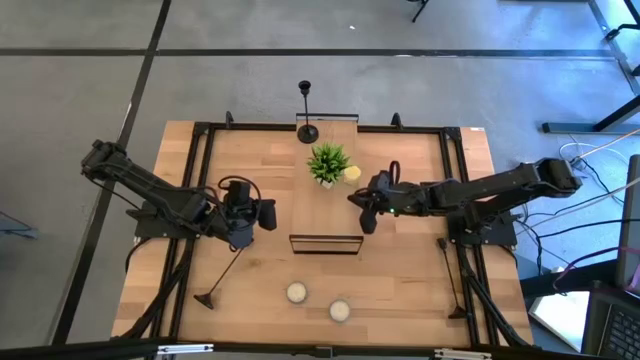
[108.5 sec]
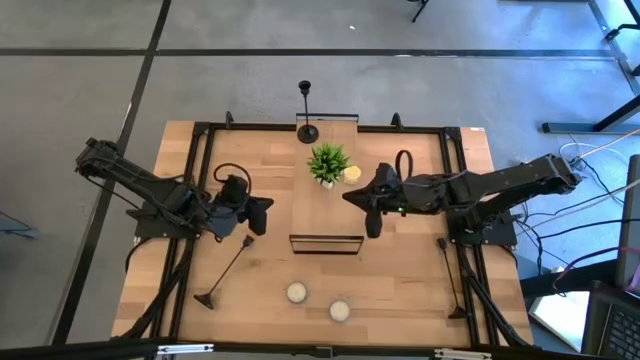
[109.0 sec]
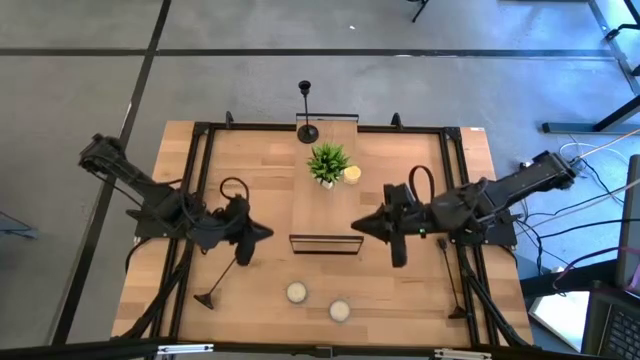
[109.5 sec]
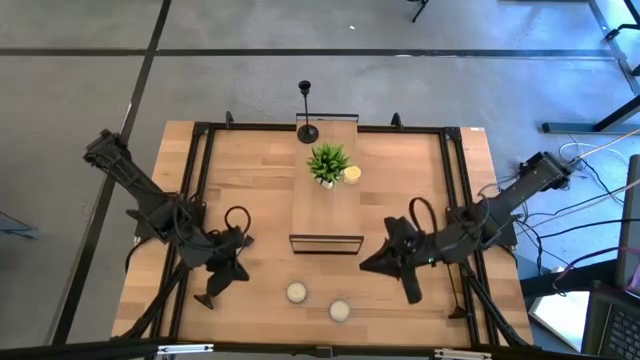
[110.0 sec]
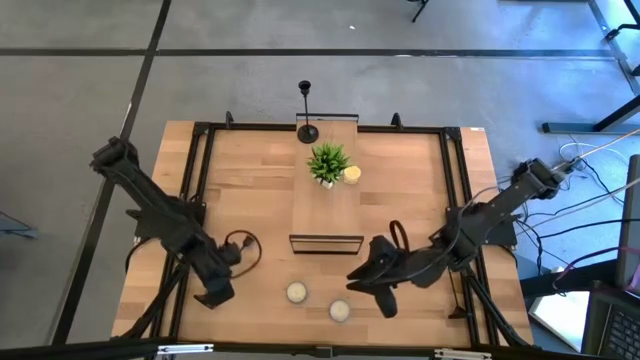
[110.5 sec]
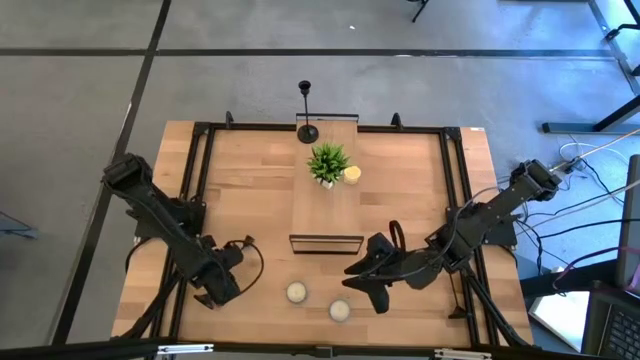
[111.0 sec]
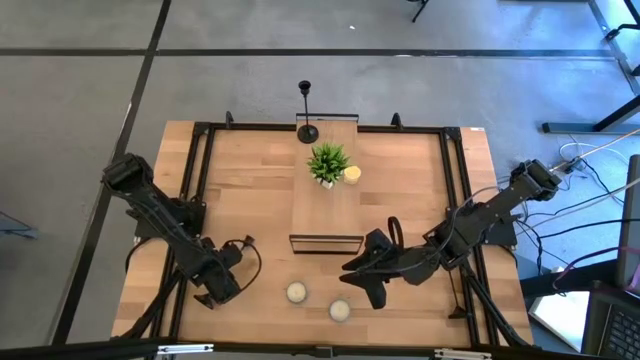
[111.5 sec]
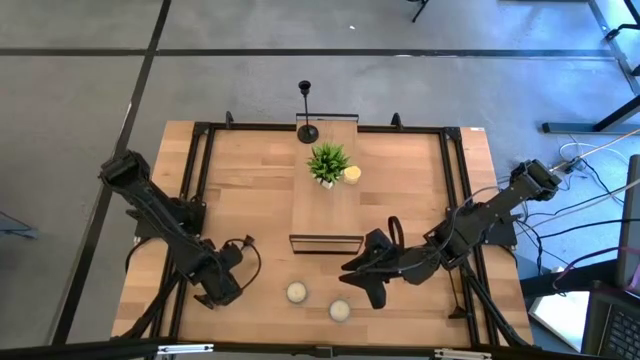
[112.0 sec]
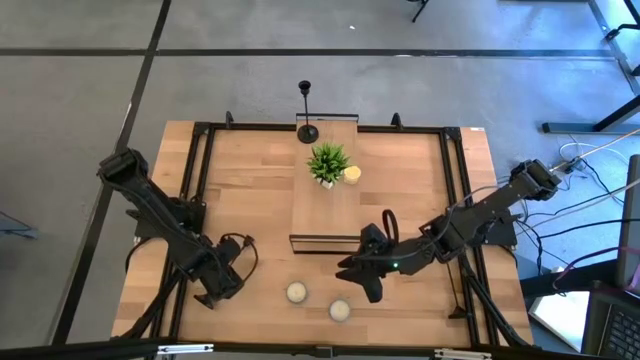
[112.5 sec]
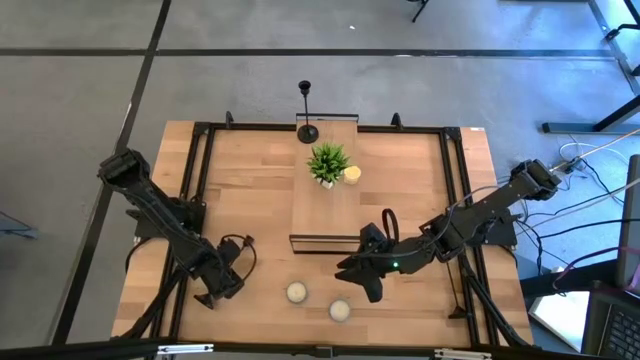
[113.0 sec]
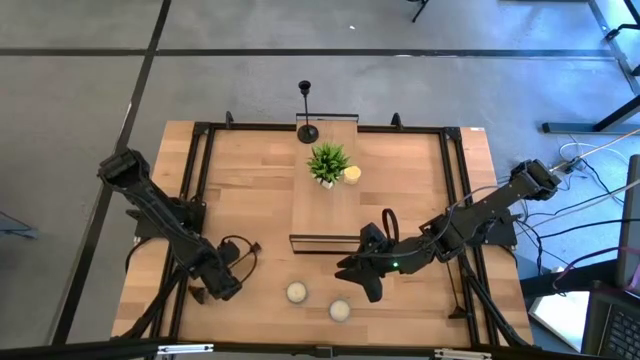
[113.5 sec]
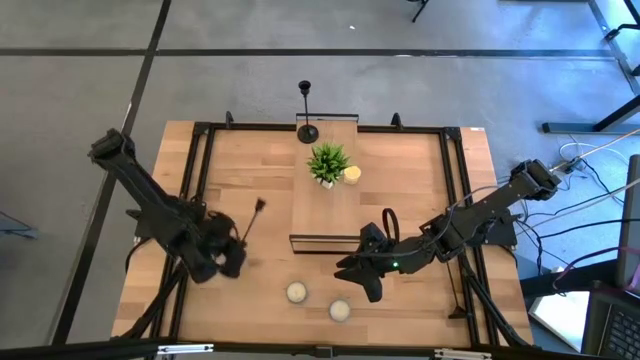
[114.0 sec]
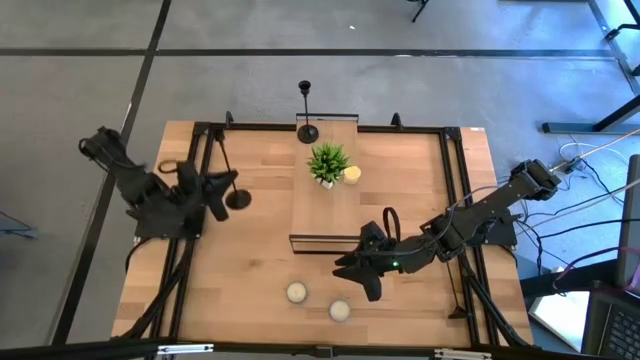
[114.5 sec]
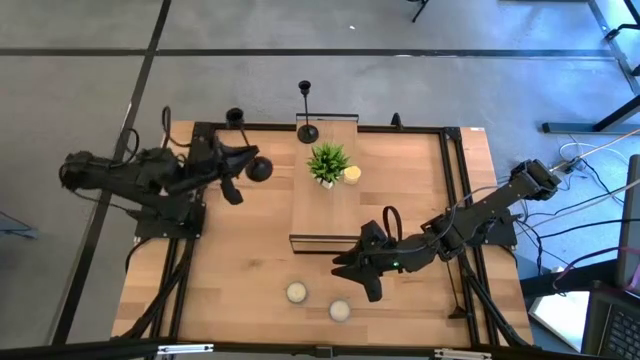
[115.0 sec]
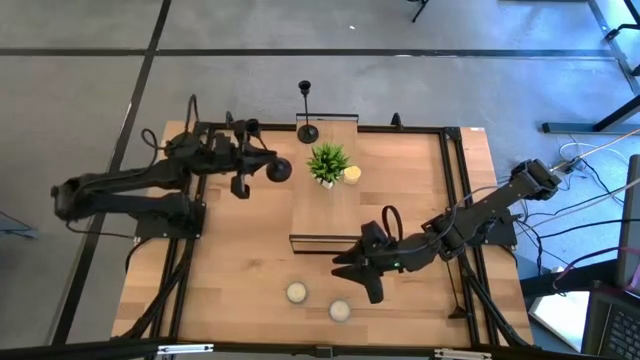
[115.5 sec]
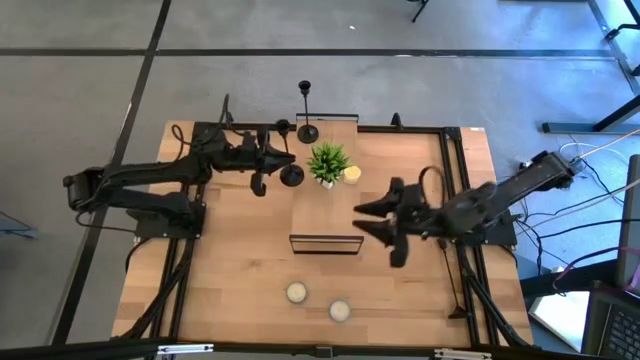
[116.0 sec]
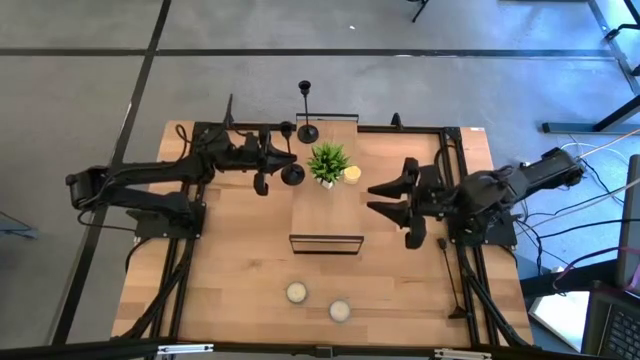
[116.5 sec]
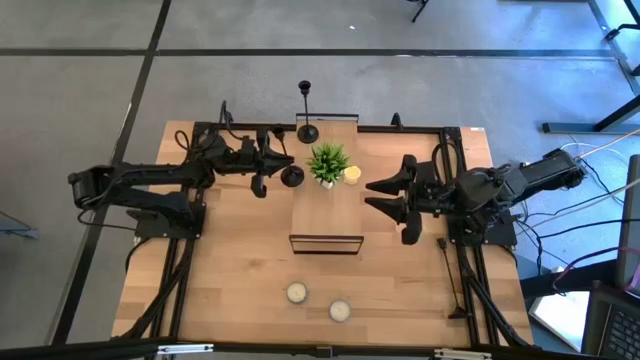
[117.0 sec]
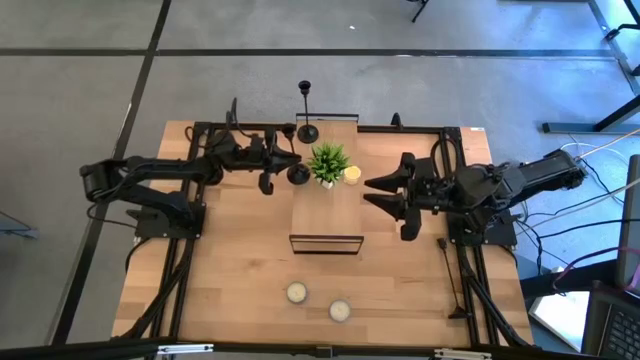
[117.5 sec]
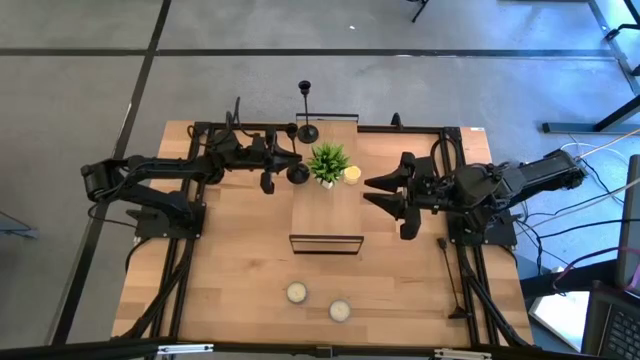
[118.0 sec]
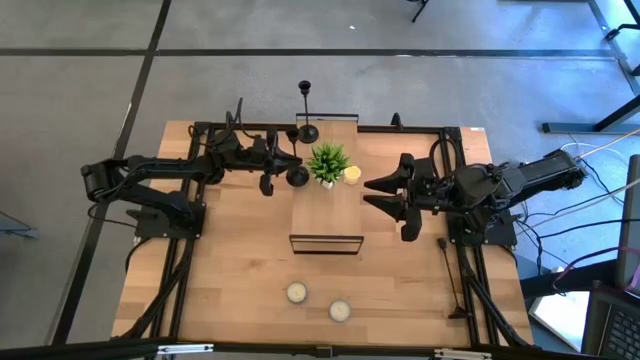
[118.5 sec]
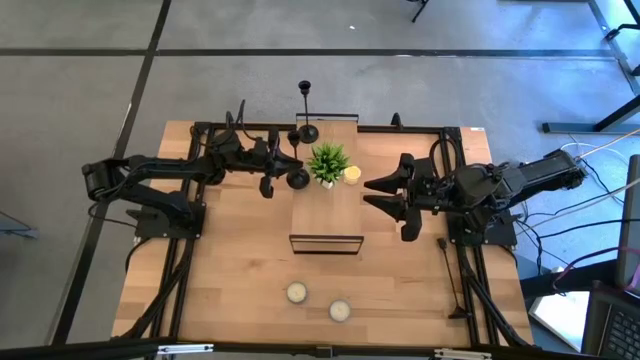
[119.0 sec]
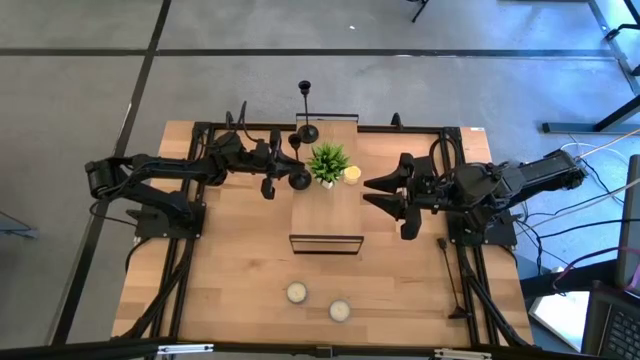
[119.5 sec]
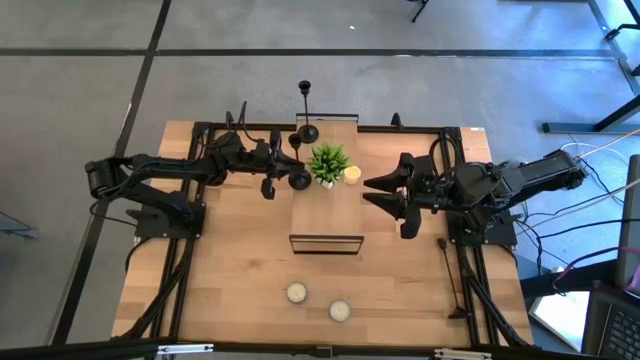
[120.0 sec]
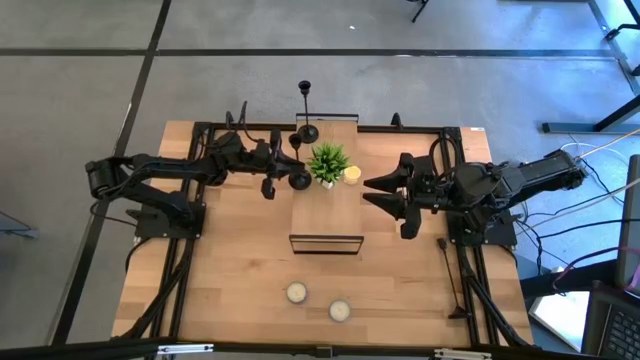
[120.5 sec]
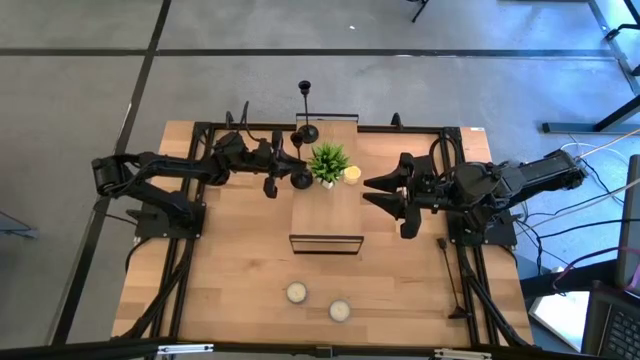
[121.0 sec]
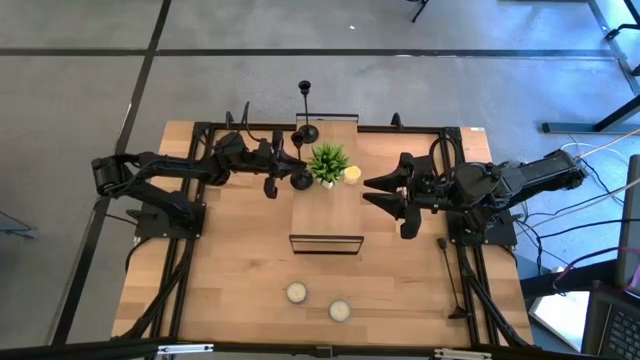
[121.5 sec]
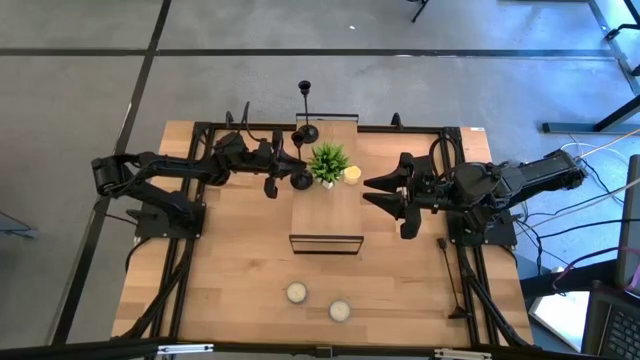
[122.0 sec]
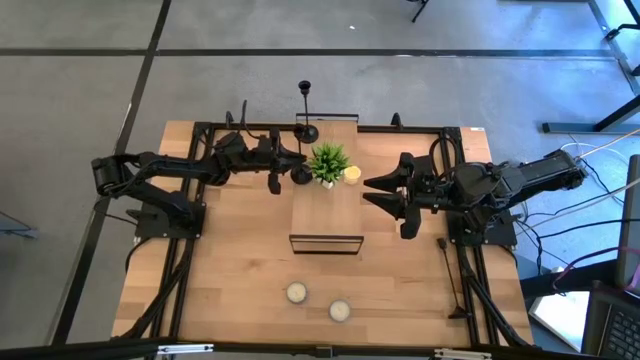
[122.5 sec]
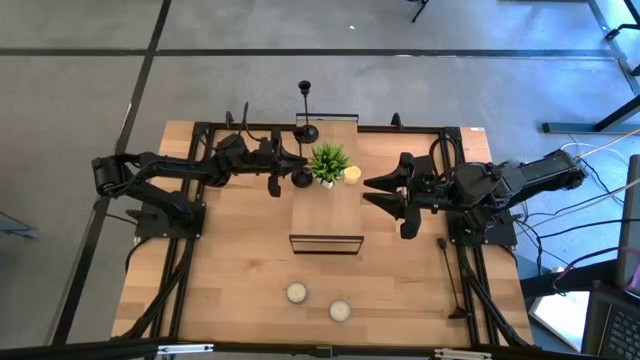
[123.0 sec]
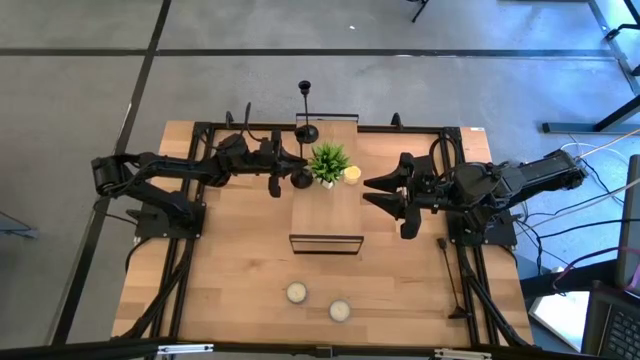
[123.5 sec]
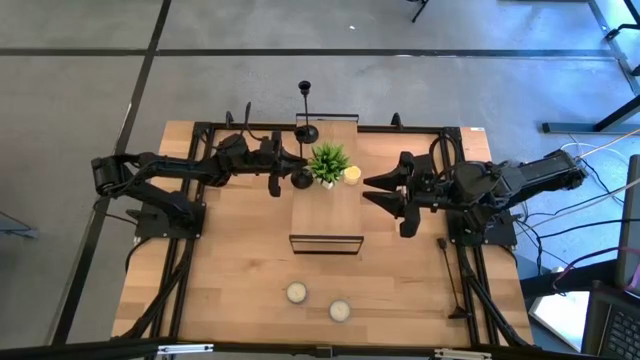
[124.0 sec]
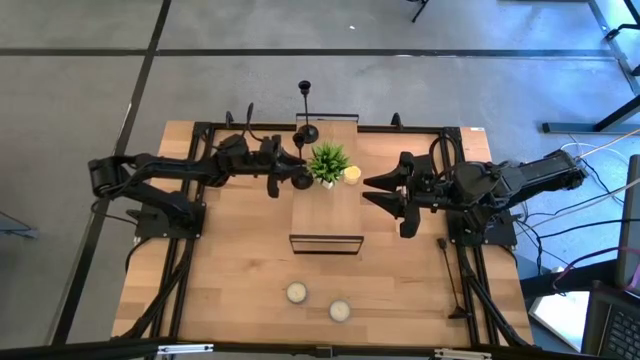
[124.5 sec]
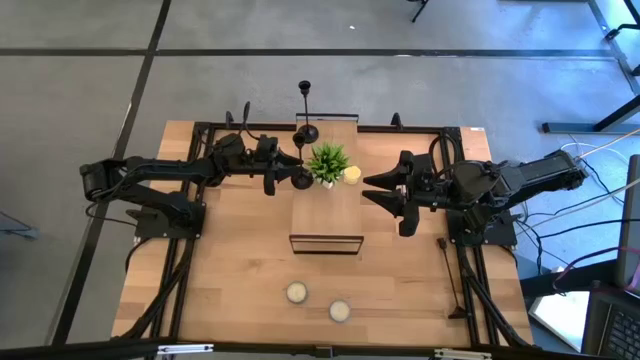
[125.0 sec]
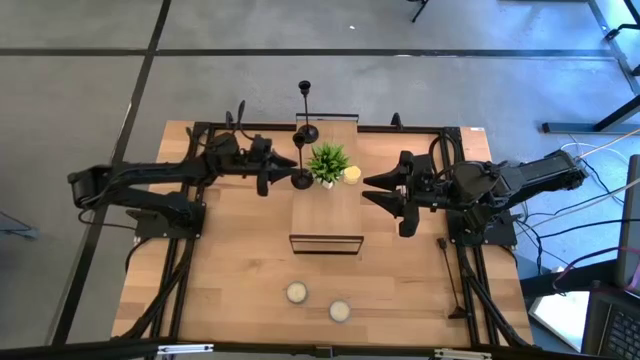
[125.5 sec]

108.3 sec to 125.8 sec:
Task: Pick & Place candle stick holders
Put the left candle holder on the shelf

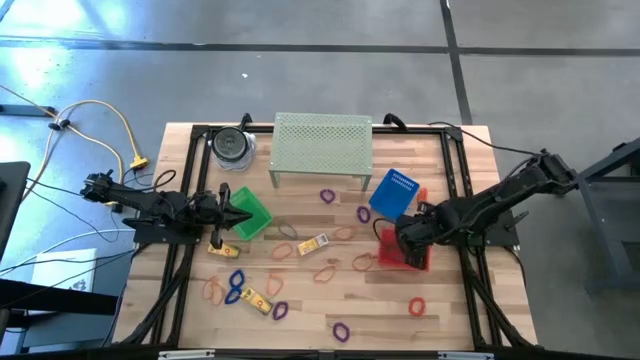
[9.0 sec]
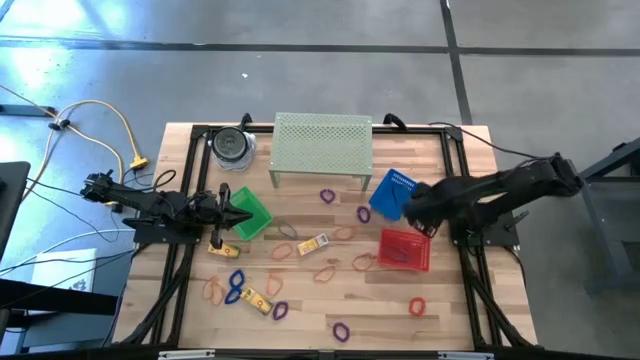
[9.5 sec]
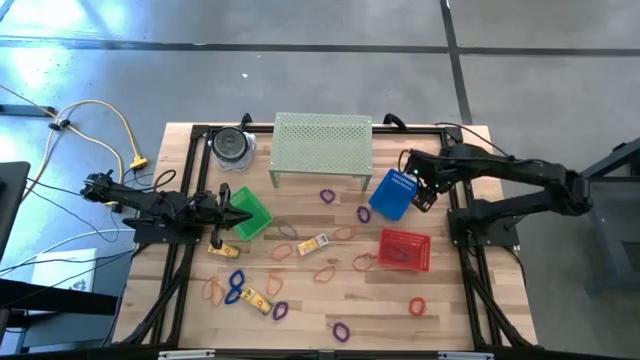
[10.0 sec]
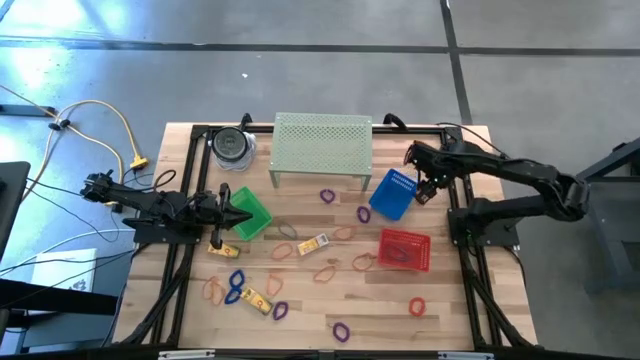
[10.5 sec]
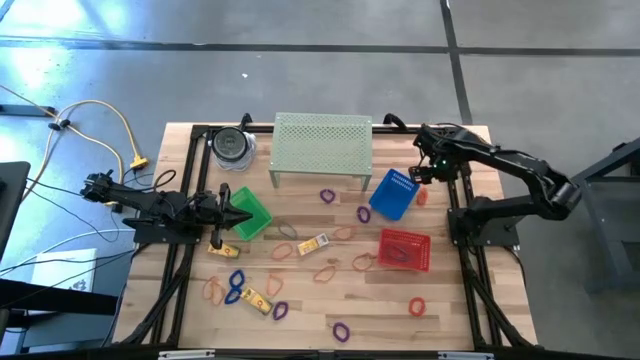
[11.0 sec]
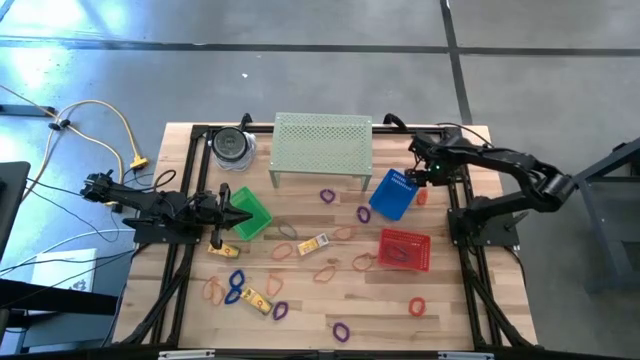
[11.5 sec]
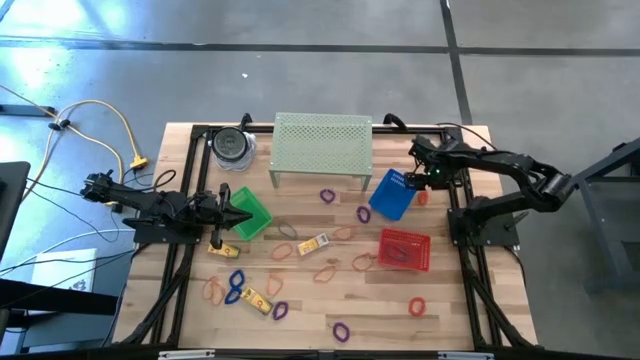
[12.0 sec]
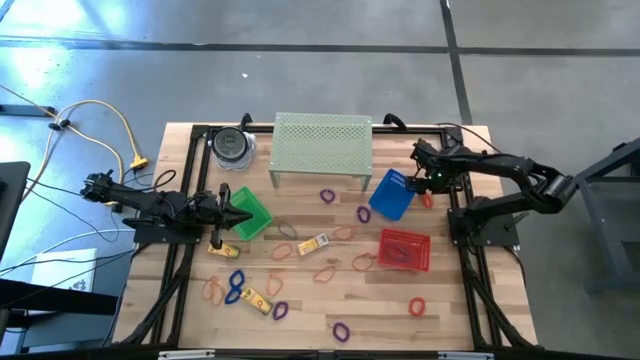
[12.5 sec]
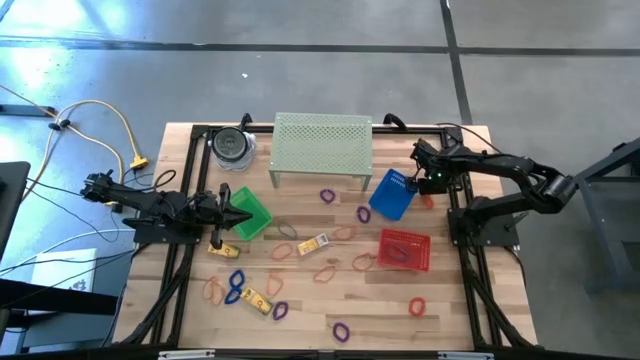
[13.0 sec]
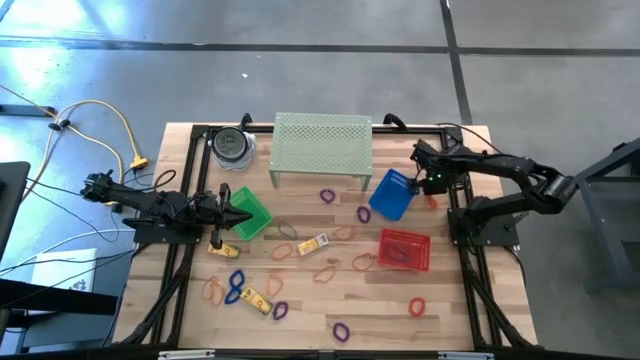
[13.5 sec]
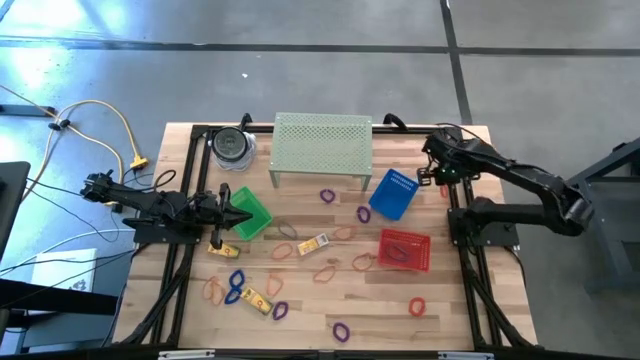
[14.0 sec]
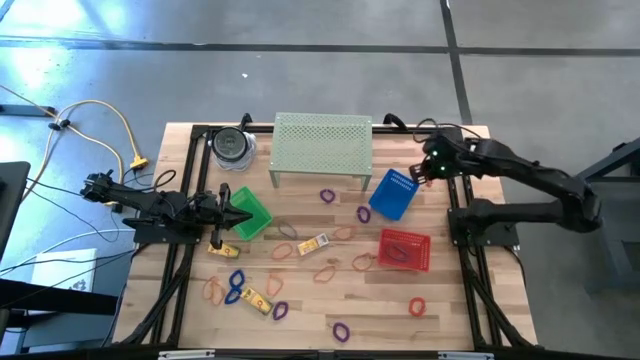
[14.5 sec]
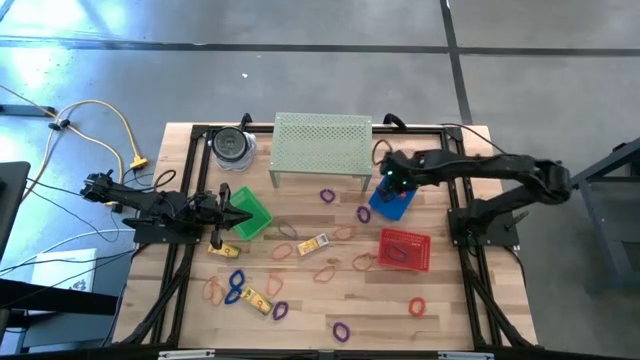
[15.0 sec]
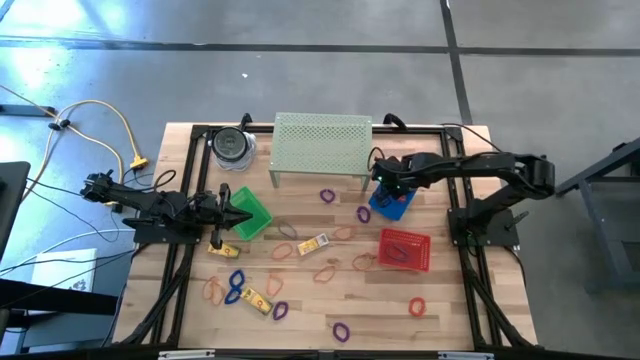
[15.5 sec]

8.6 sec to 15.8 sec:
Task: Pick & Place Office Desk Supplies
Put the orange spring keychain into the blue basket
